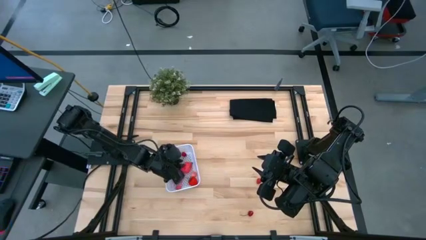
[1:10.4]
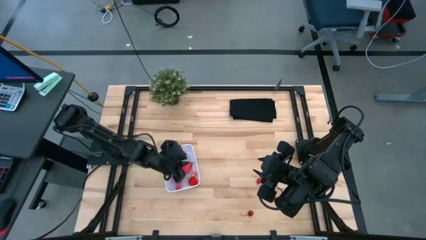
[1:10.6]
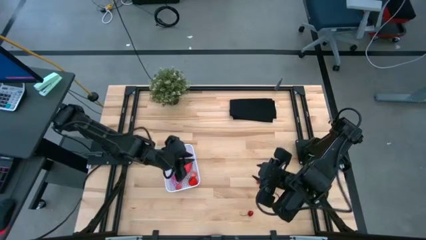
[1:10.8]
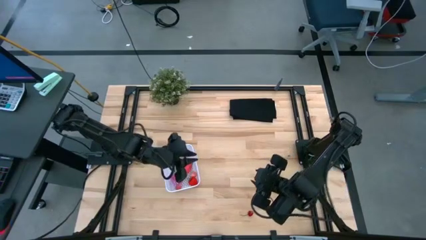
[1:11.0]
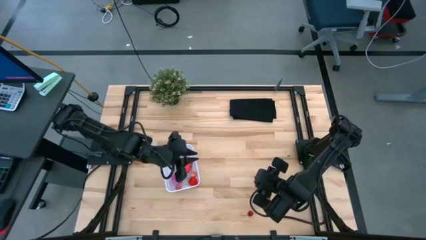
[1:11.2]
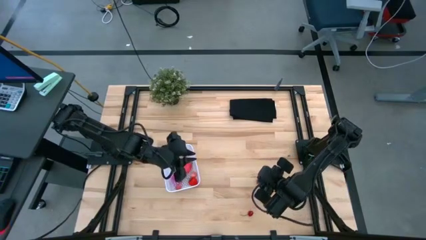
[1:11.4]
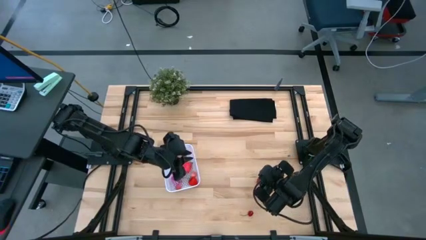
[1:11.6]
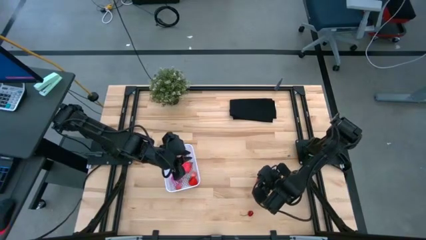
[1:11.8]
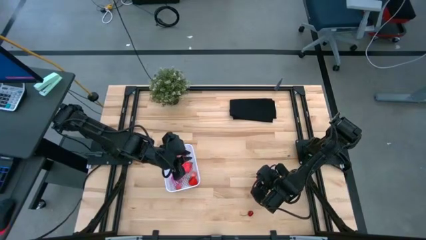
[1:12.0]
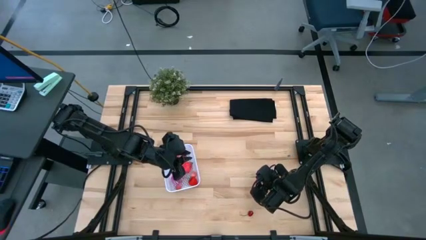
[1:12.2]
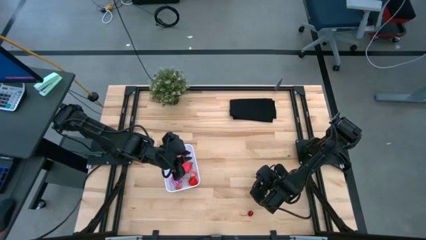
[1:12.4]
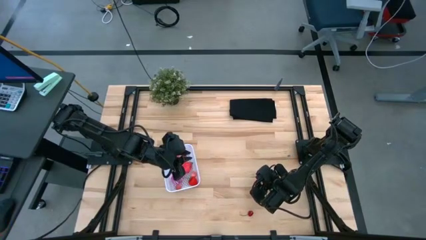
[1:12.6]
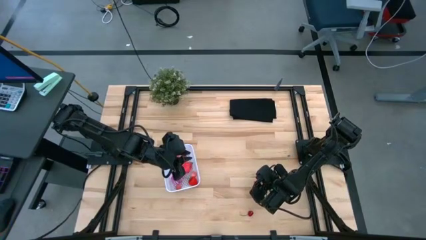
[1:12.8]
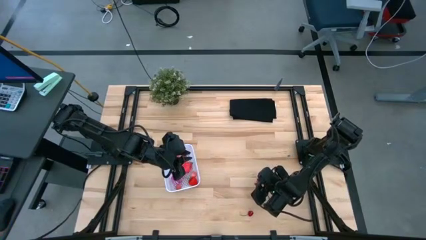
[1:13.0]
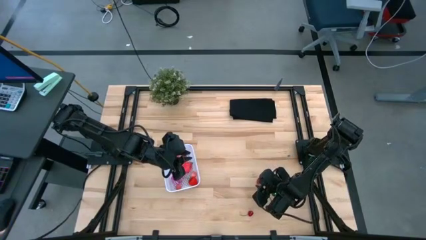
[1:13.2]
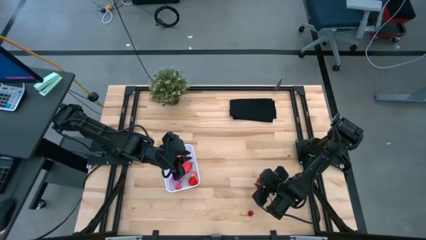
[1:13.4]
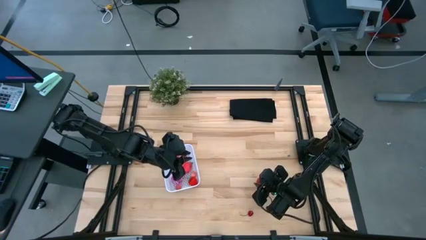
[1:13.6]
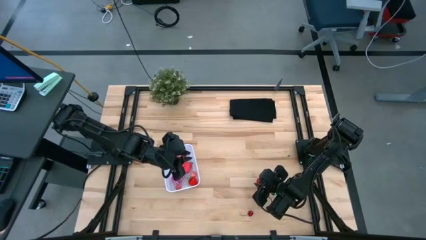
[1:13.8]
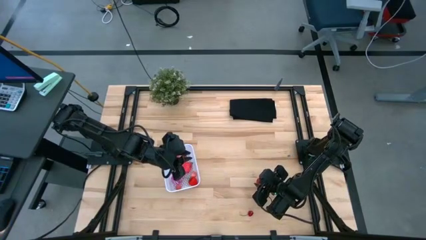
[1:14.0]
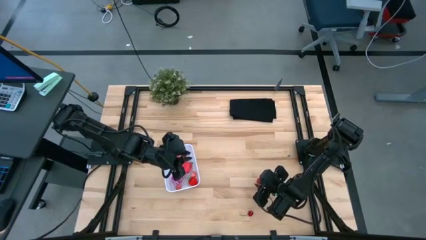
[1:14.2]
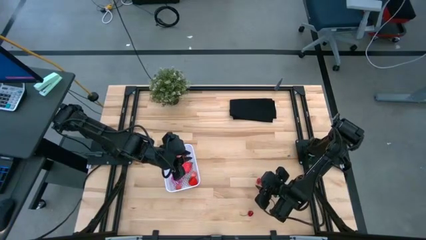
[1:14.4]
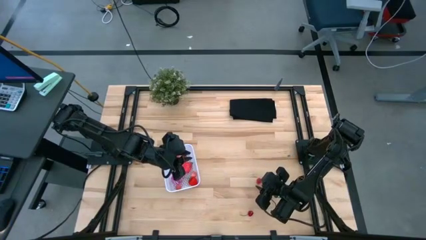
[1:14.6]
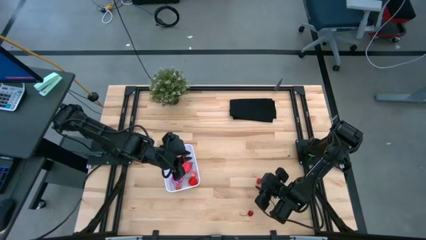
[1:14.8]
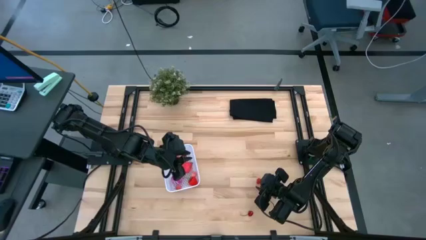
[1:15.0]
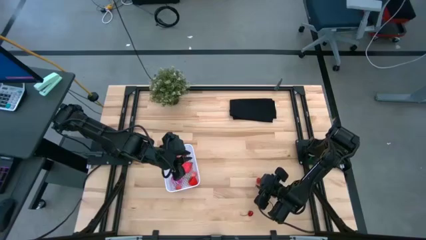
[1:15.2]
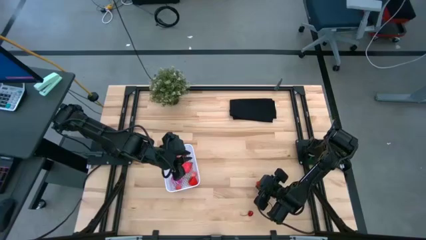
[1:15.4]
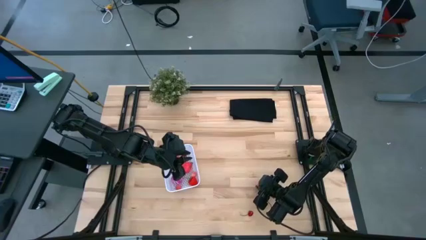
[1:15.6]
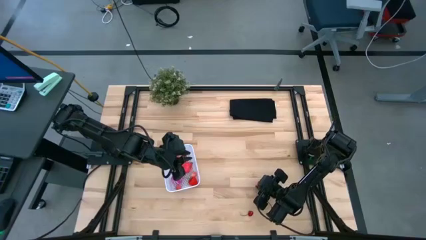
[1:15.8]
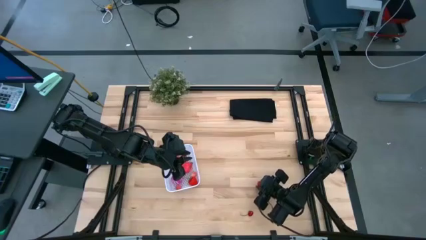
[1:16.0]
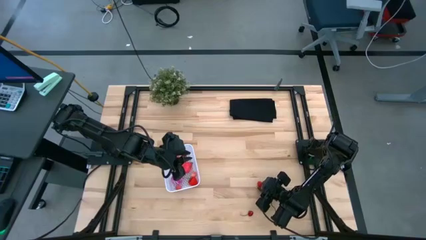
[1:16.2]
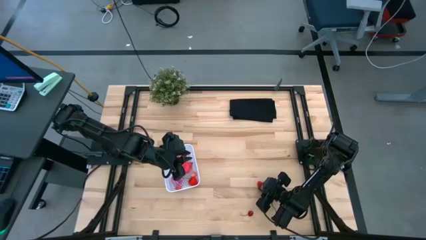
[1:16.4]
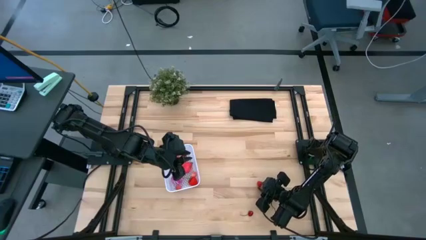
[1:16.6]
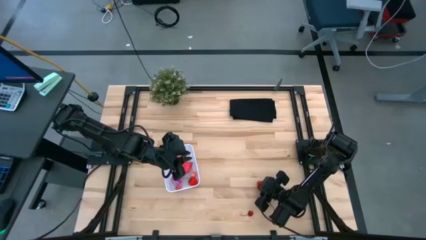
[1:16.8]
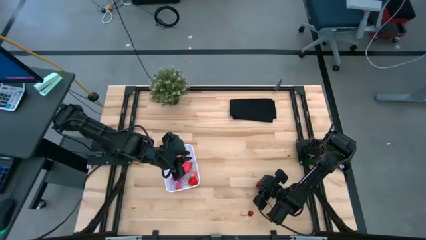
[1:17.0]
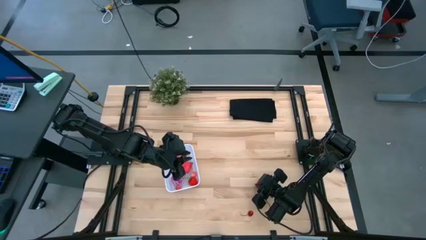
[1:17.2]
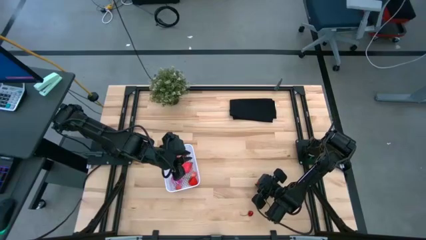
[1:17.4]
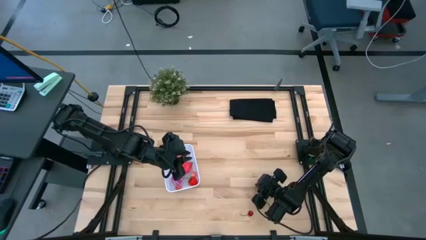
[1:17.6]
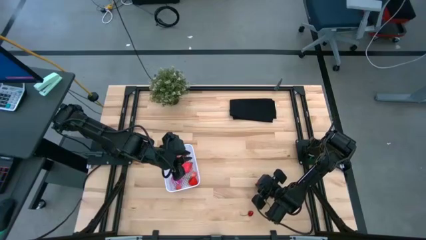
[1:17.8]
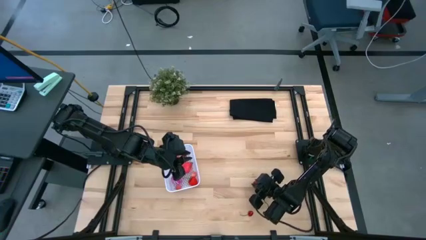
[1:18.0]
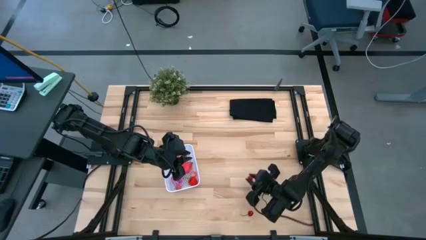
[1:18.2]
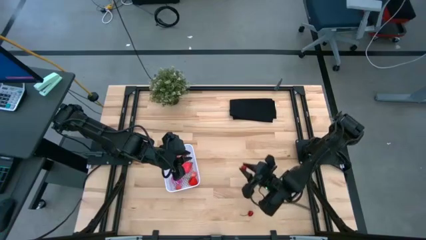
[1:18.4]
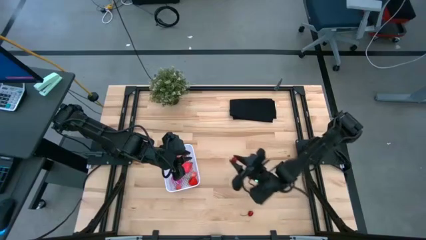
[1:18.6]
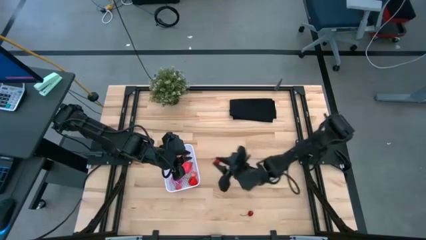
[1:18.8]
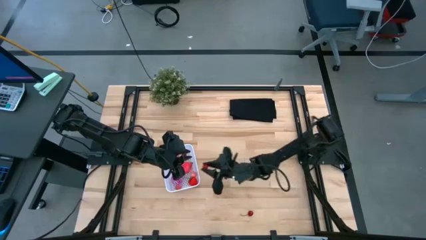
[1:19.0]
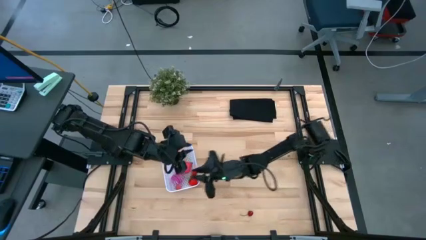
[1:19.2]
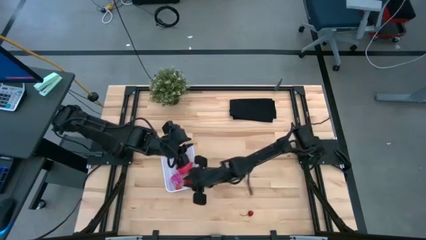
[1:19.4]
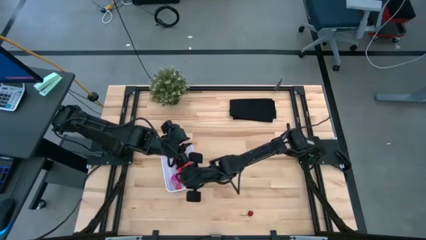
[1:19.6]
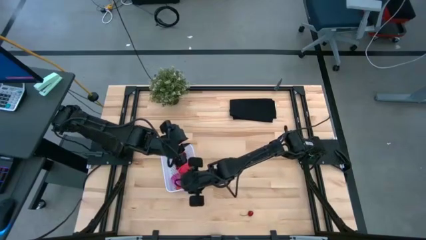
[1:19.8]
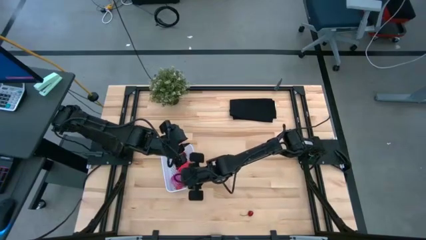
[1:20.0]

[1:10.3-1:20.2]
Task: Pick and placing Produce into tupperware
Put the strawberry into the white bin

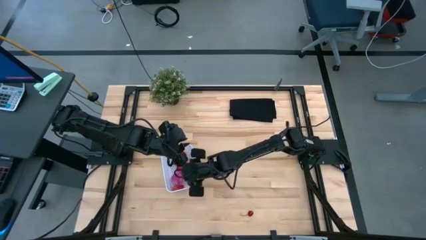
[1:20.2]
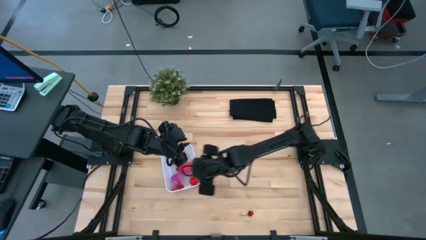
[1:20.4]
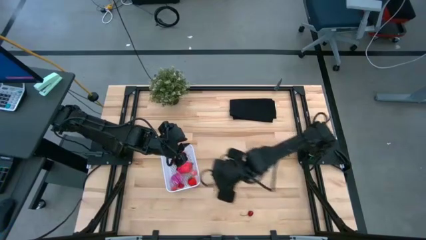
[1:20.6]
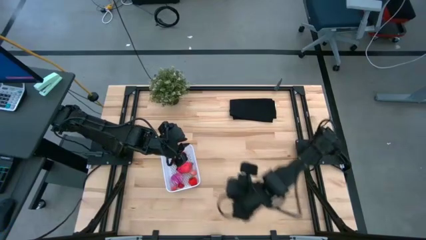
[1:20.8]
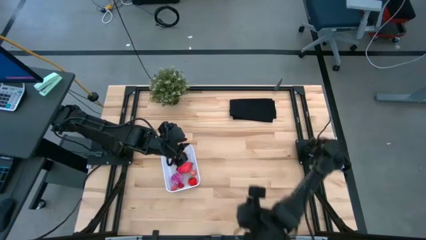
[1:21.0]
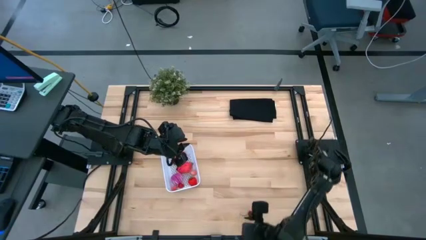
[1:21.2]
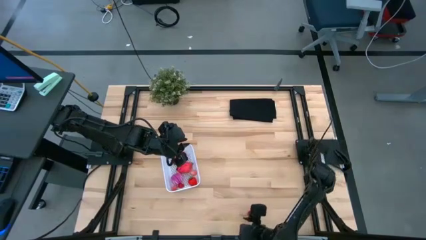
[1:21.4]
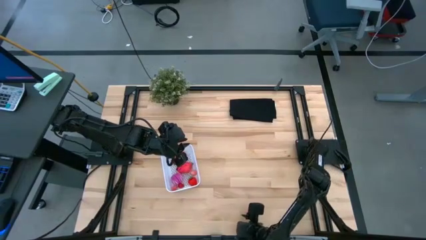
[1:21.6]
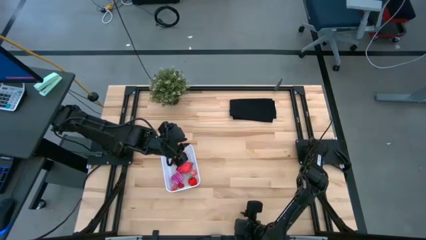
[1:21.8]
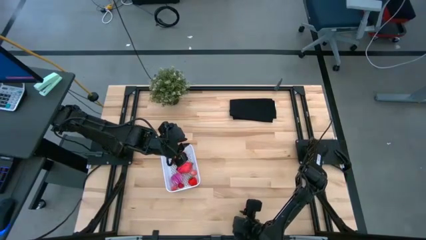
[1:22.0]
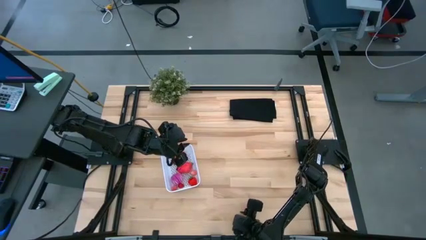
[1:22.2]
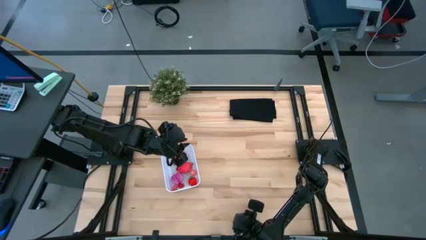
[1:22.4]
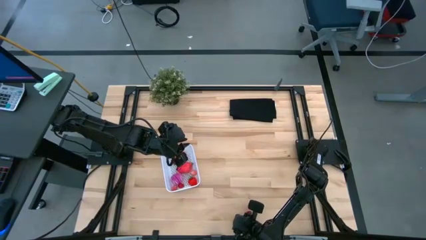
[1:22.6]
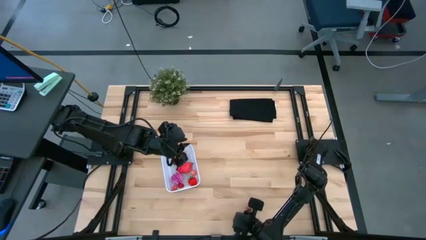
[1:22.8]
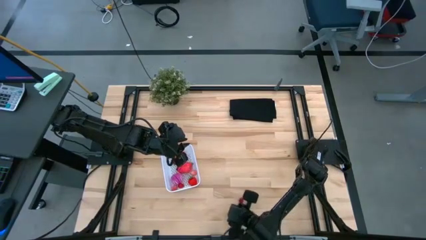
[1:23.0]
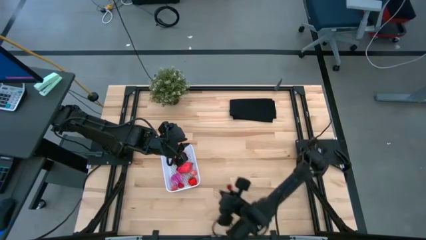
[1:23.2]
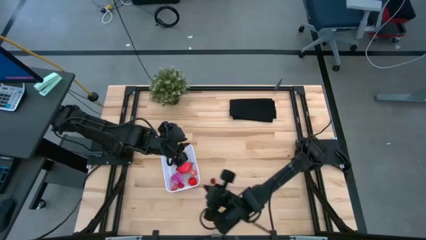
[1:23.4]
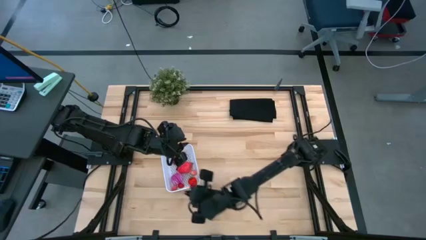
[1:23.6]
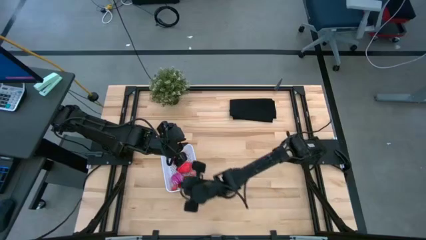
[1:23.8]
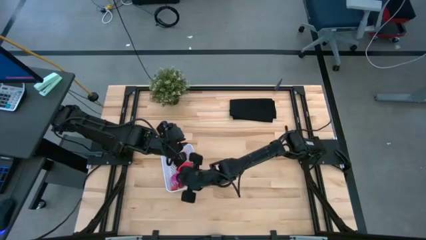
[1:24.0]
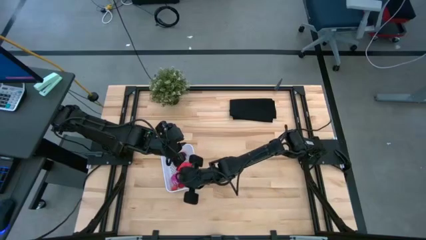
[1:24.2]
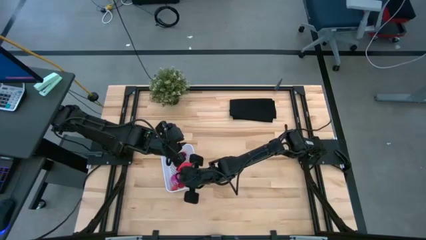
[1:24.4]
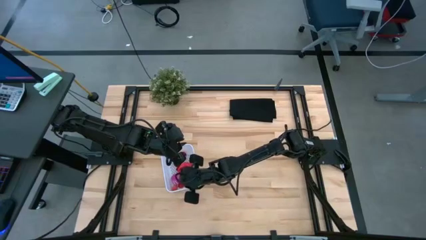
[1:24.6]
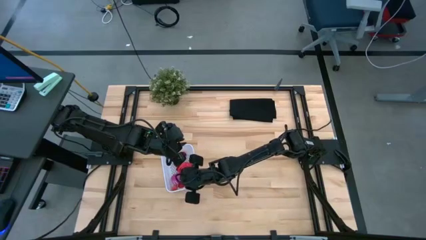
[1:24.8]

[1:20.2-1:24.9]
Put the cherry into the white bin

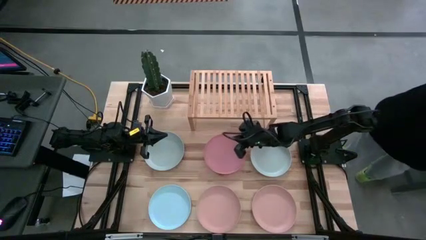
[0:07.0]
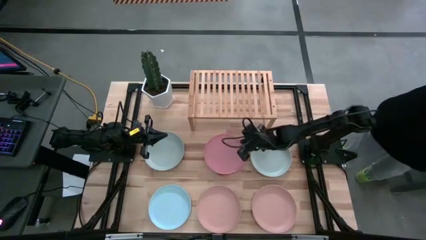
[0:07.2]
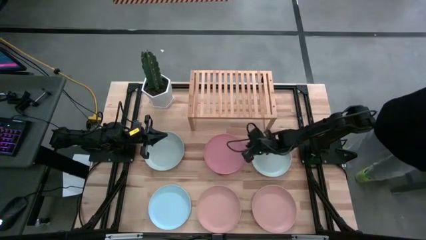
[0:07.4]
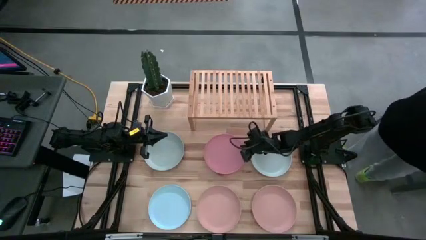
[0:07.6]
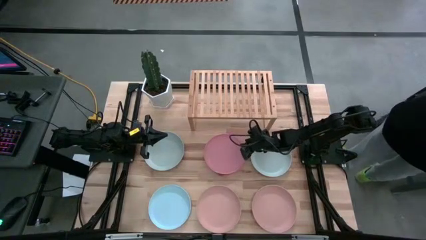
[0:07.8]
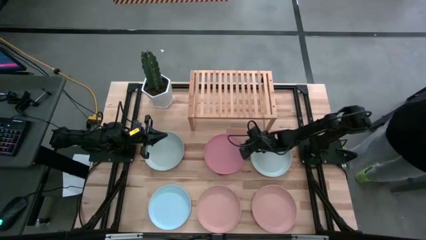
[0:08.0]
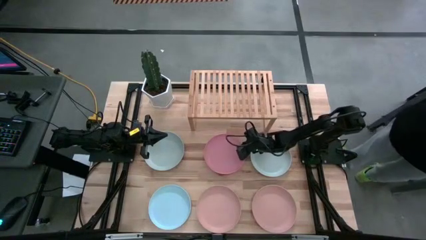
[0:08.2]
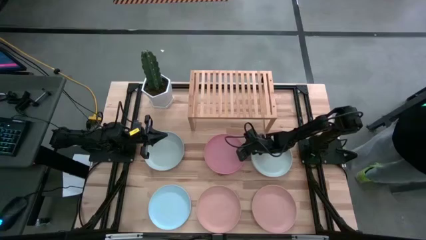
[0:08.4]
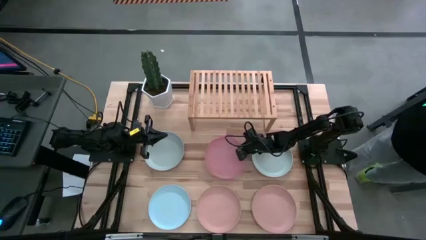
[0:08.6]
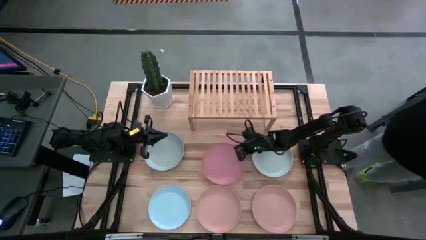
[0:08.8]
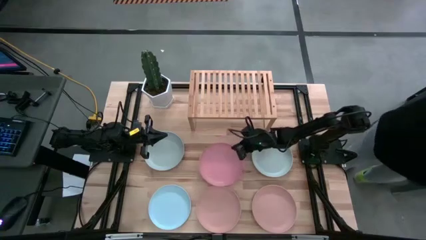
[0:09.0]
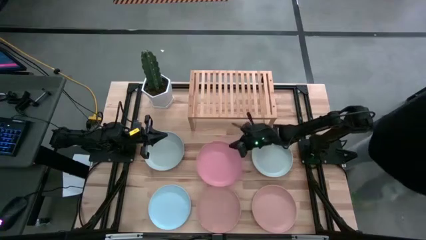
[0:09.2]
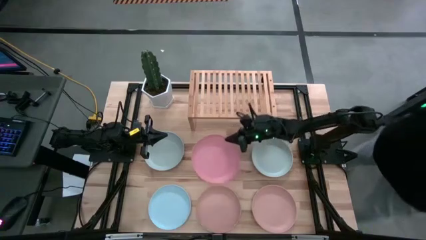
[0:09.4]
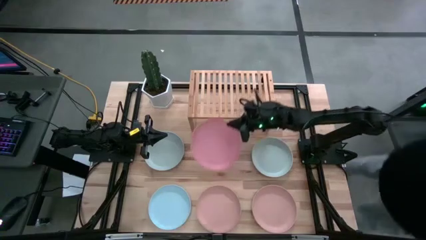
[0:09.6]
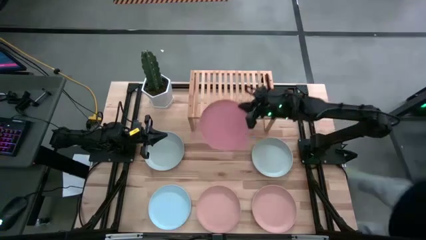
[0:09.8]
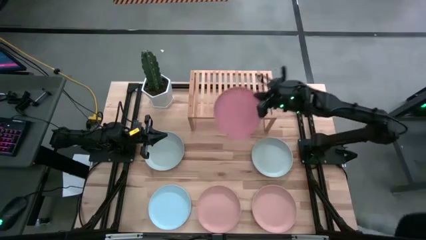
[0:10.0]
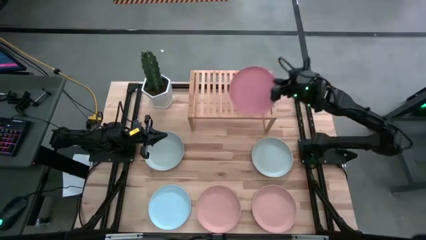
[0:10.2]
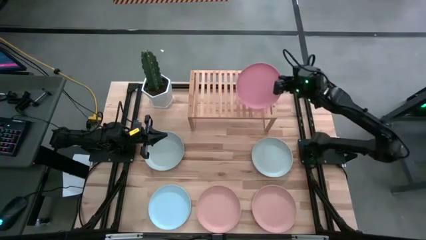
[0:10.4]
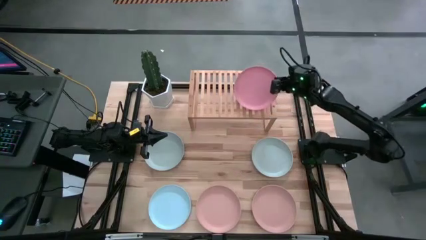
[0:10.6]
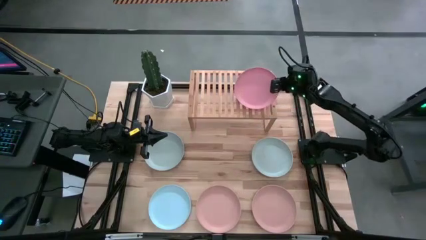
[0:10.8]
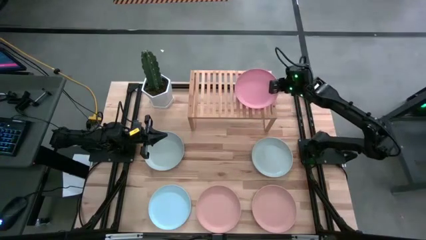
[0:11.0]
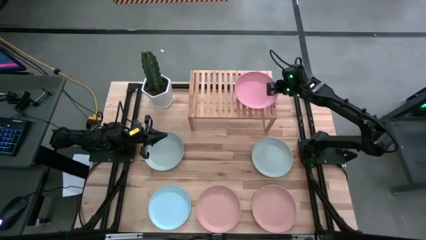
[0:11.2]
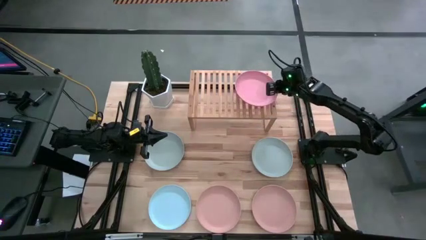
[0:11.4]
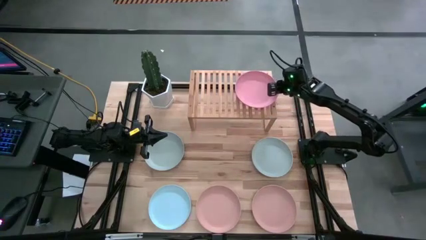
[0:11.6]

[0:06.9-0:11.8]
Task: Place and stack plates onto a shelf
Put the pink plate on the shelf
